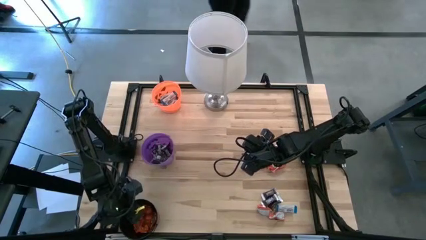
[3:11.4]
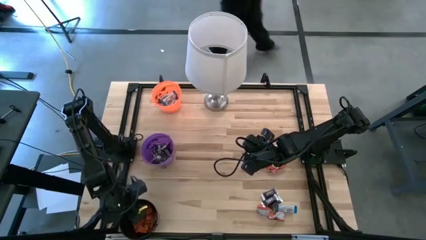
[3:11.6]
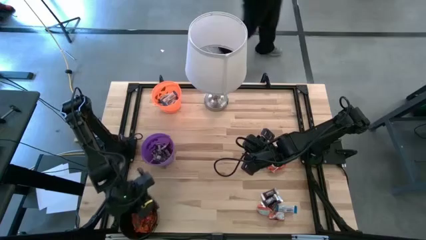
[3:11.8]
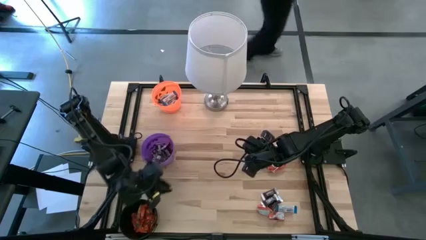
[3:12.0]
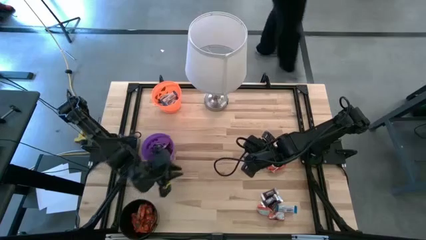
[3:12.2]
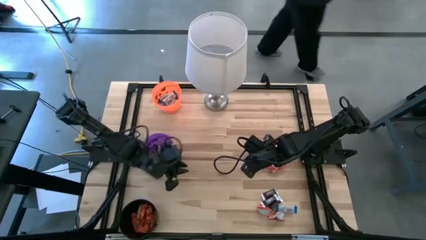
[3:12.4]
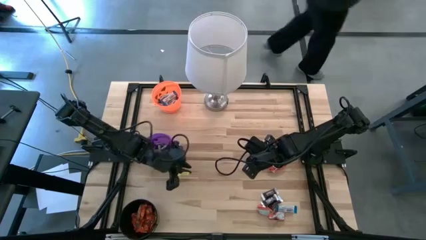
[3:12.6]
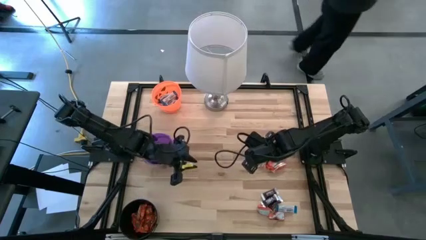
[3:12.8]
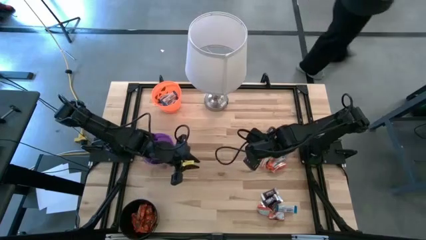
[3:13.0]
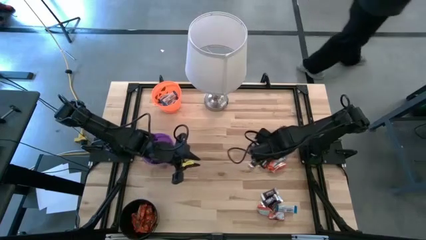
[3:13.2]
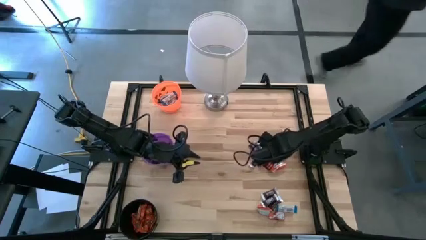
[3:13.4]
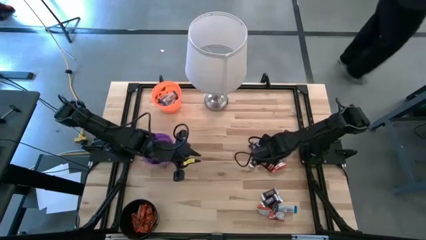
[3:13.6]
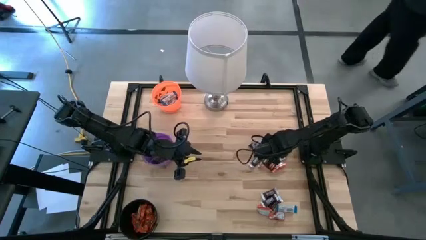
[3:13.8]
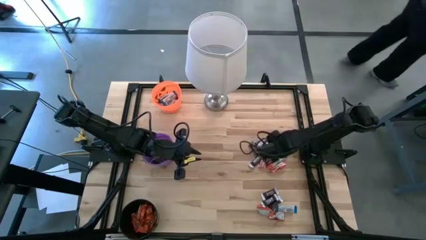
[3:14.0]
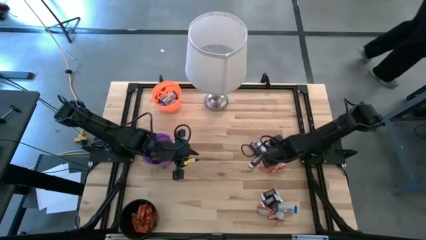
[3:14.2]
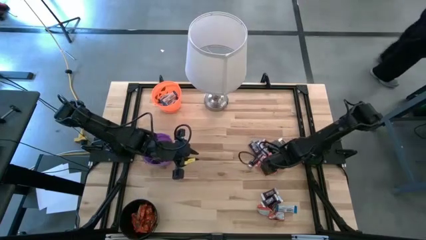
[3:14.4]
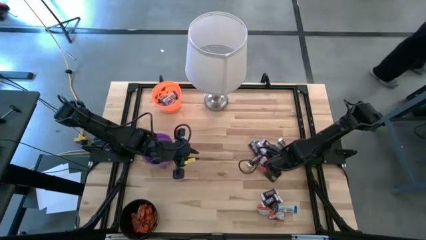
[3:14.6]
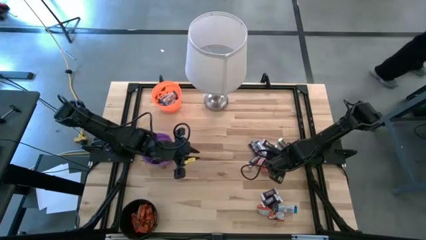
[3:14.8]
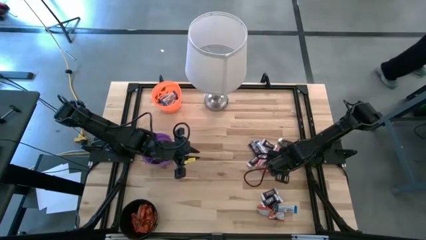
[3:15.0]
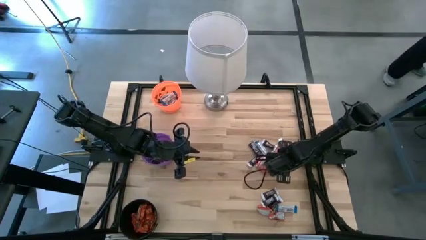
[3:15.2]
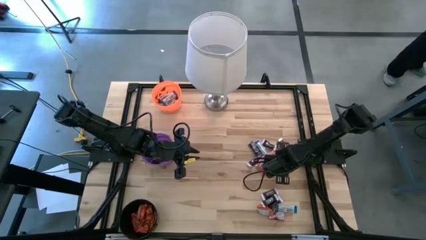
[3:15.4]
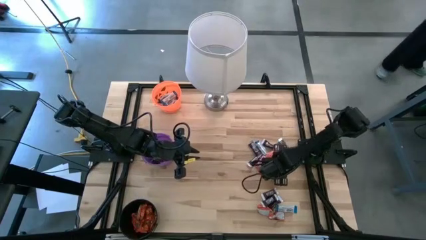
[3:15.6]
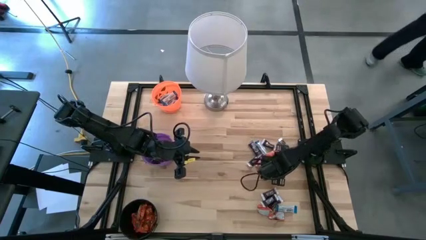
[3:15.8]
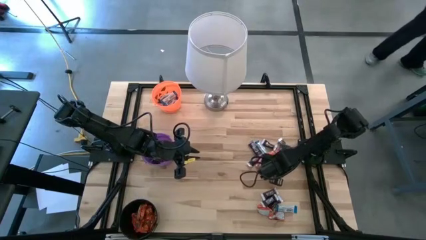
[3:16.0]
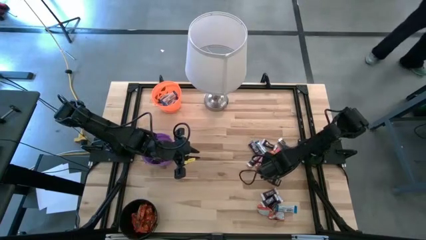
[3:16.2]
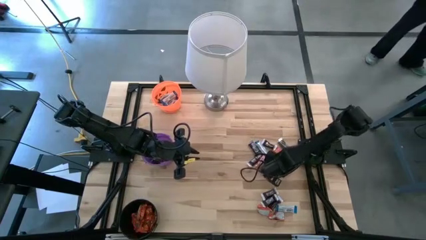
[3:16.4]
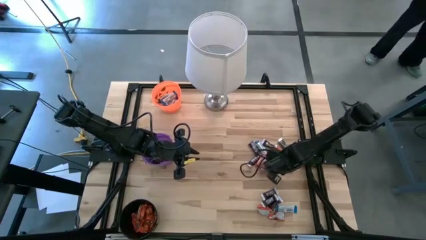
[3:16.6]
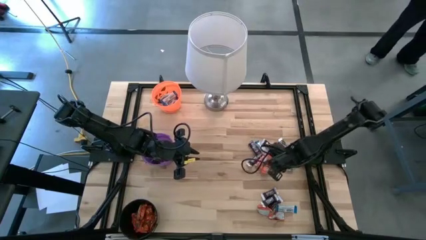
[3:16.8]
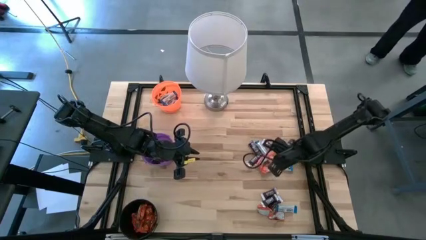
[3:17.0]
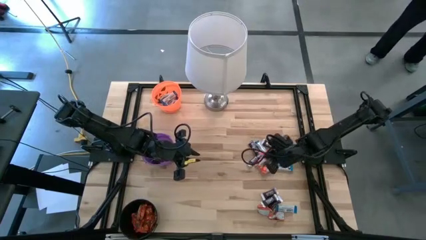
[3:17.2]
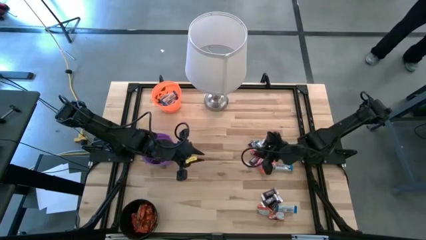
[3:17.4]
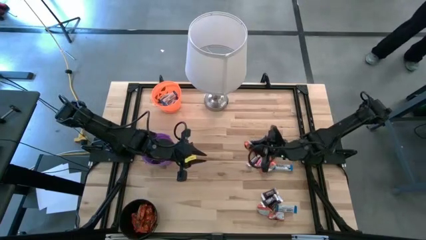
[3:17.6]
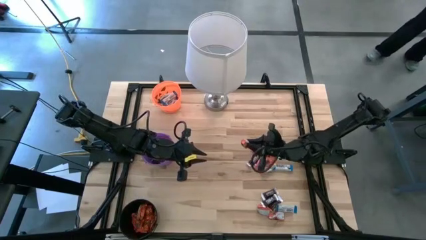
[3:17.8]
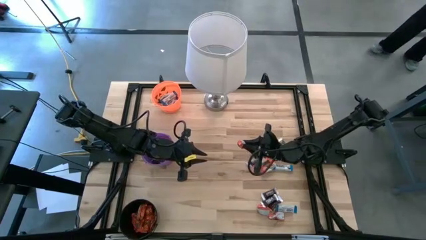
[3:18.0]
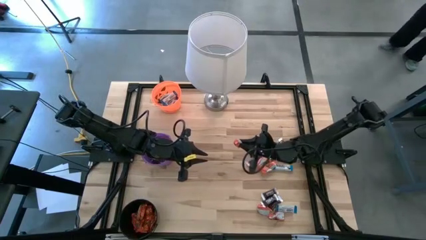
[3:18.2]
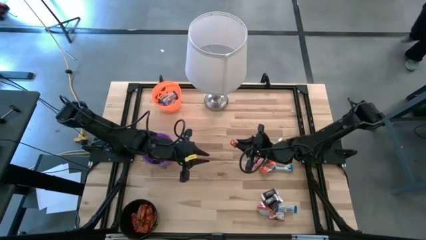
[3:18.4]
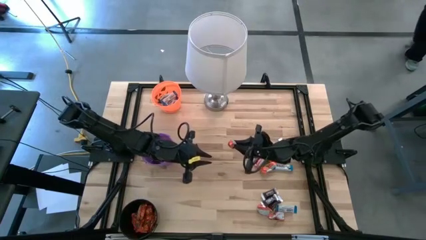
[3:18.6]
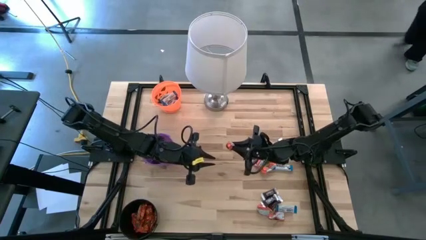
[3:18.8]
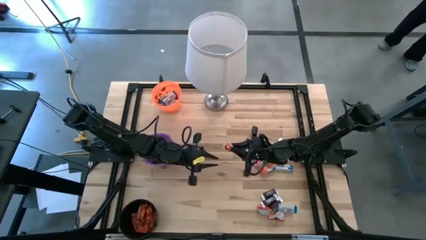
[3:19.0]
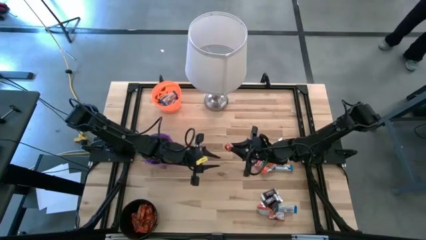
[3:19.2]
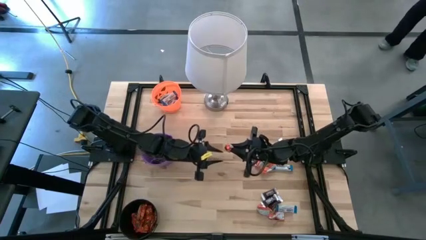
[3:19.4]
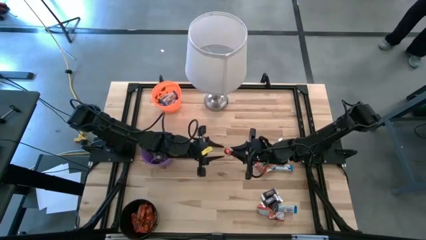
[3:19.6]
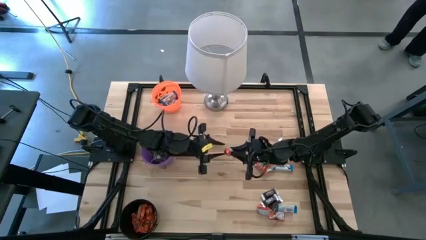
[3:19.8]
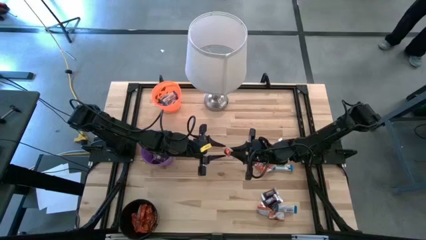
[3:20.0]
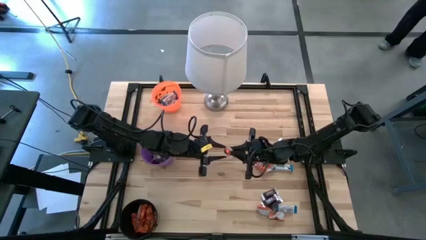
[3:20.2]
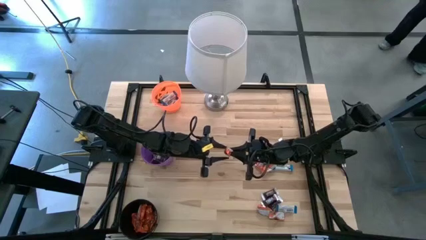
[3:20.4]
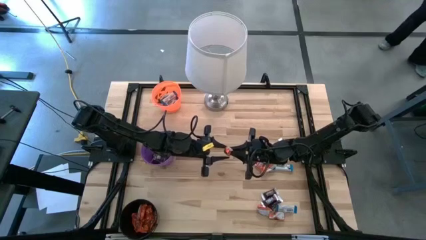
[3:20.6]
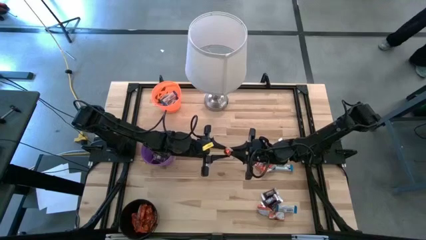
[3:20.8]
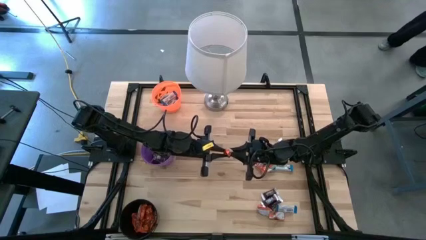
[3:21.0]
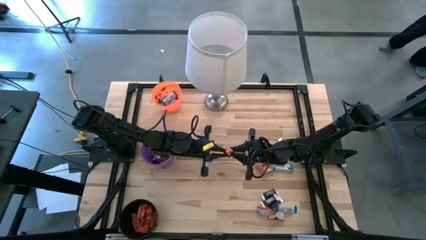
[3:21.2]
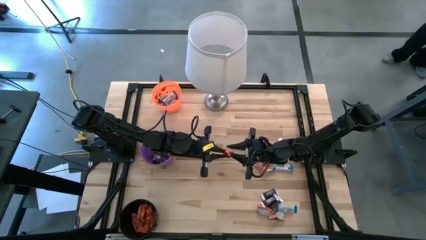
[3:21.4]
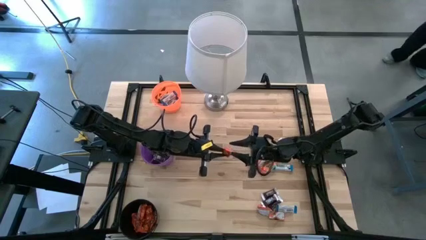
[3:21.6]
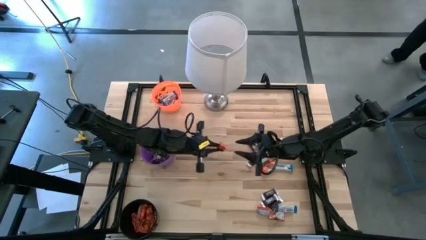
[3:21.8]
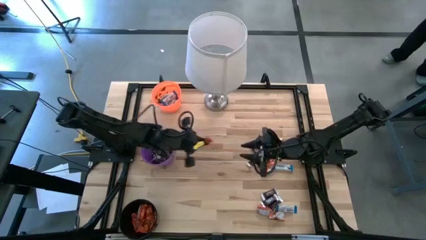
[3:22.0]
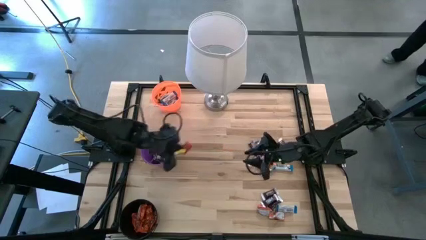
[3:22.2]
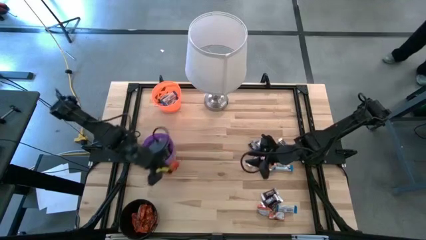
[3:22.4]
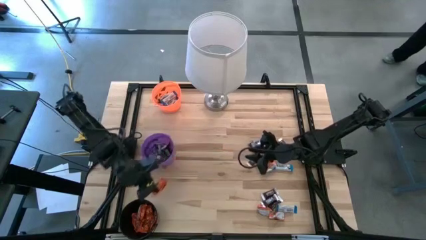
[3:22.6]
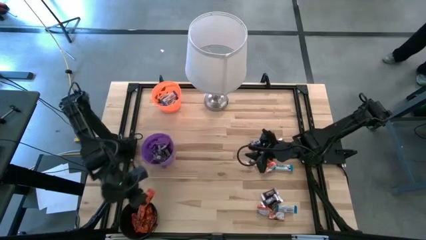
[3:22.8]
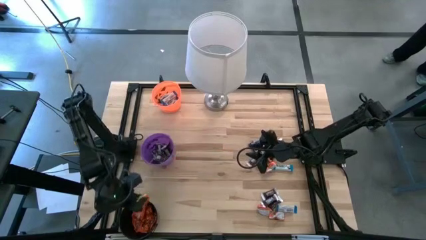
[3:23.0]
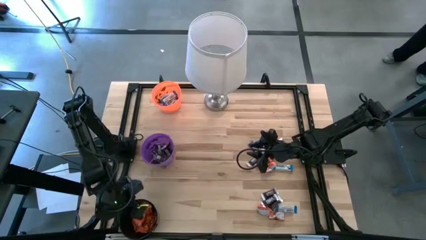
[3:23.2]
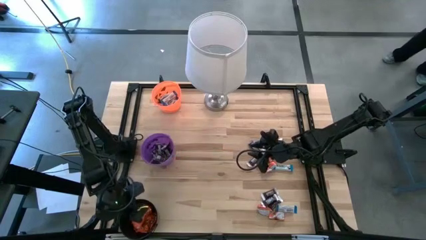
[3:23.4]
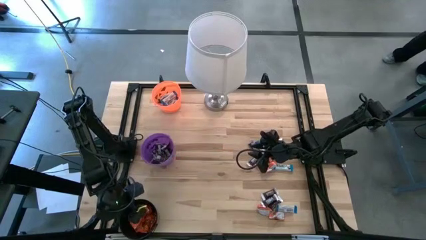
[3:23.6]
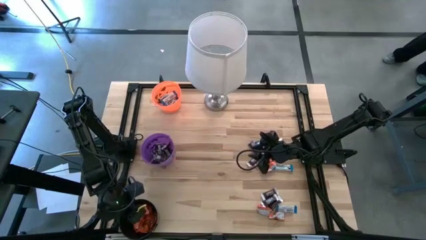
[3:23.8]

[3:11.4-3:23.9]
Task: Sort candy
Put the orange chocolate into the black bucket

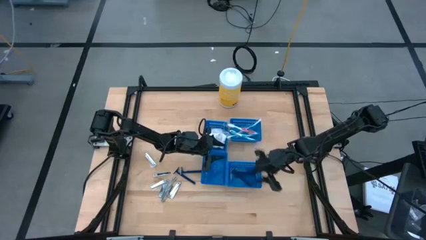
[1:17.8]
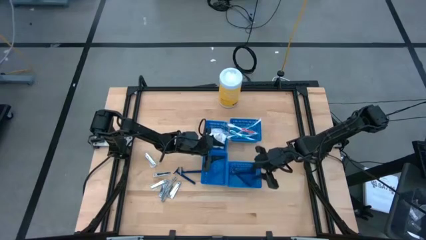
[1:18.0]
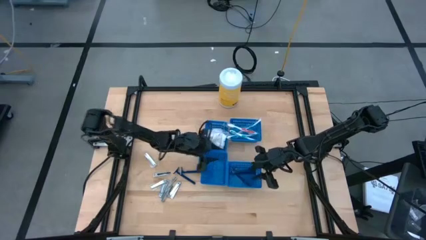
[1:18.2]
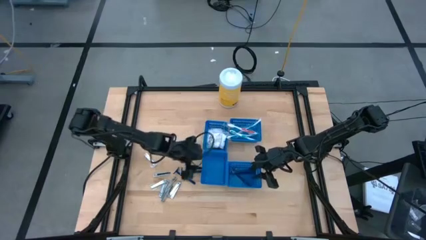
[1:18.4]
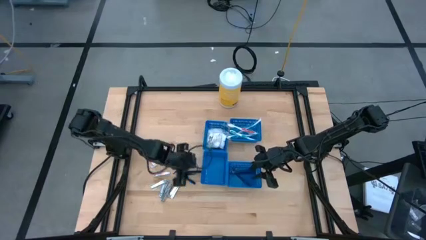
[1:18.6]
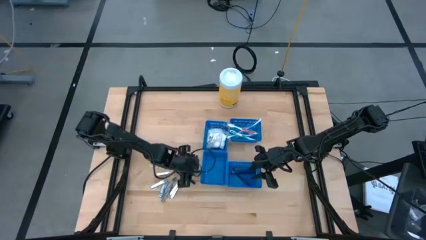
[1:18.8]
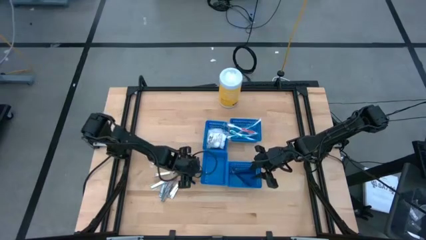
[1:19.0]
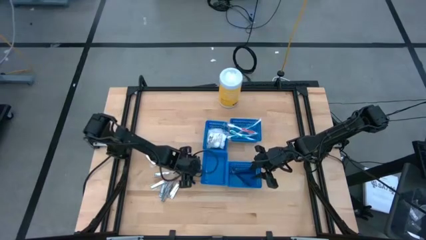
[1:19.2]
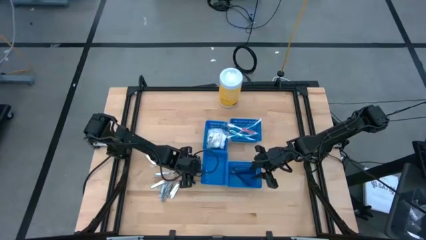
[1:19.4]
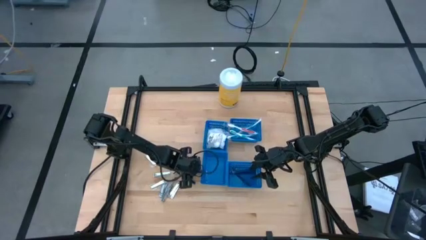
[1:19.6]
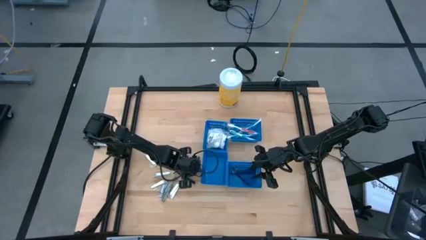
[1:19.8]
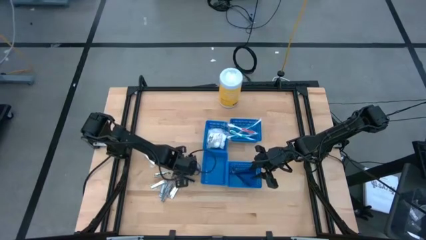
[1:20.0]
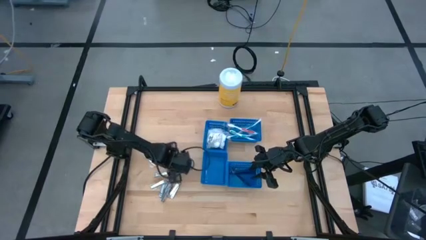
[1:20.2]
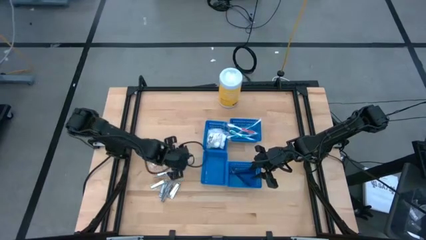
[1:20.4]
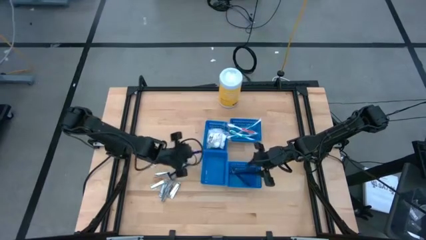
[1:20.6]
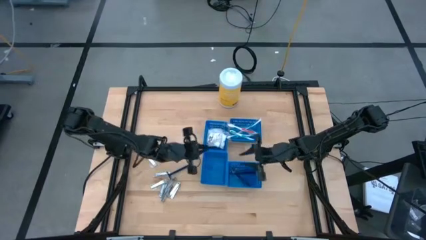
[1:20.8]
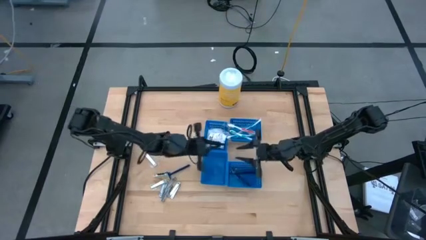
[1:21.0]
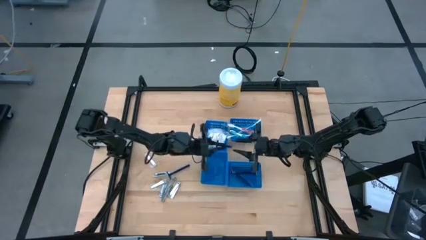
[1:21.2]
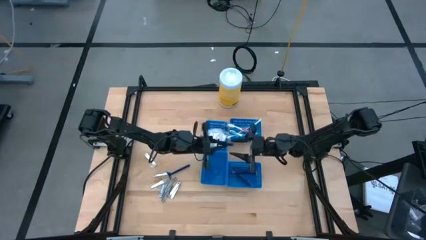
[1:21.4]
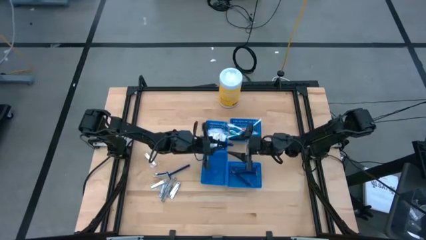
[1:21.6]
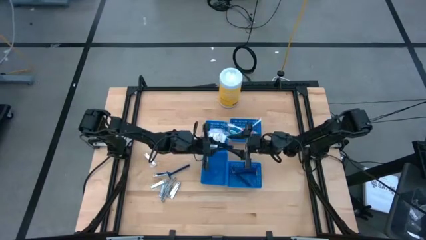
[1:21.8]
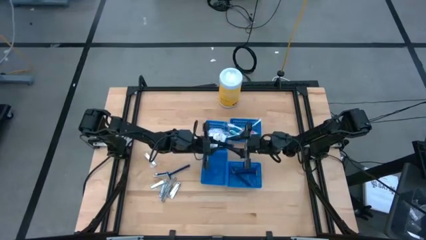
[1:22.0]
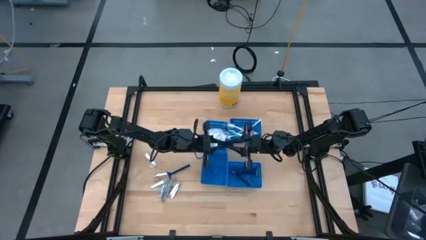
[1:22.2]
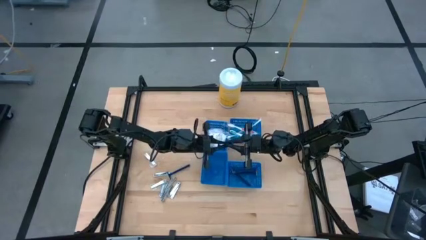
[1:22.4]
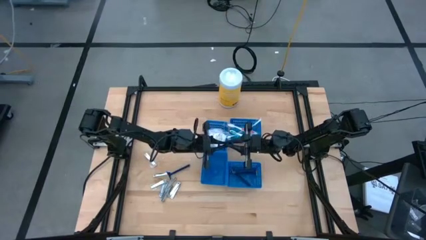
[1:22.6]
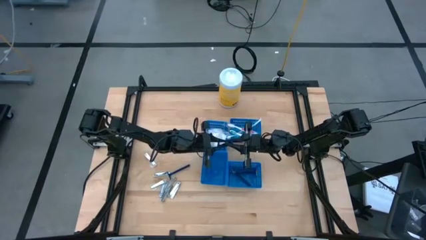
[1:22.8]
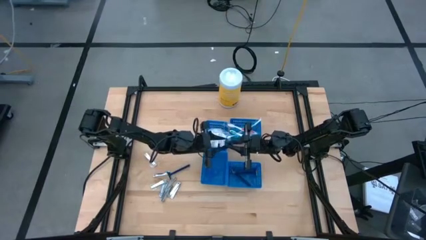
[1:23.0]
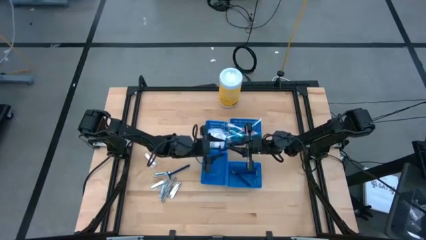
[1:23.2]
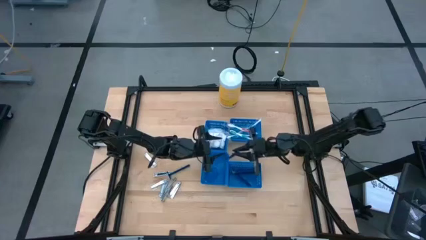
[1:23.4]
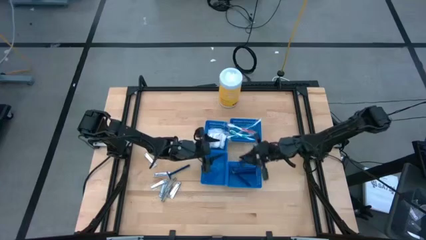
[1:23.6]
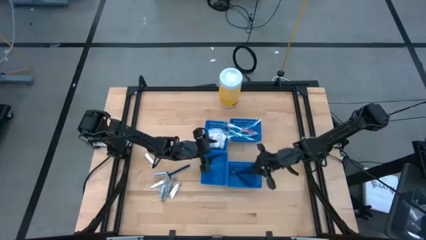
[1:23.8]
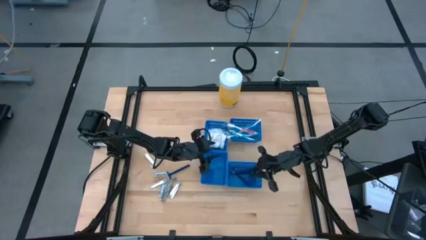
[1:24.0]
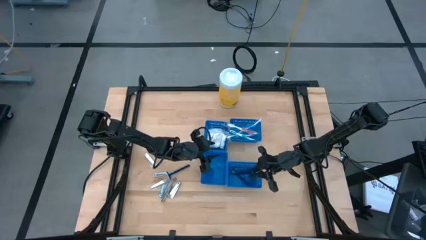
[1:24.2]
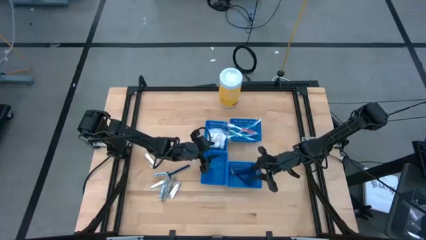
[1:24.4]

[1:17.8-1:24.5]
Task: Pick & Place Travel size toiletries
Put the blue razor into the bottom right blue bin
